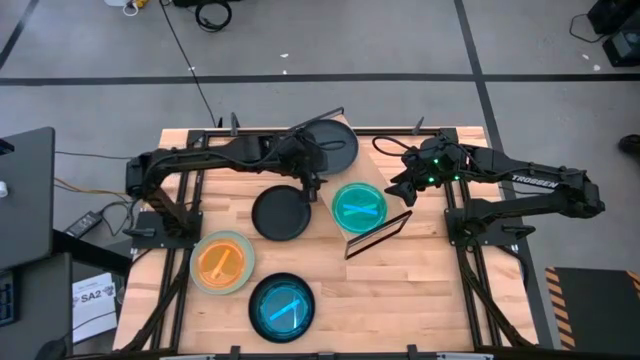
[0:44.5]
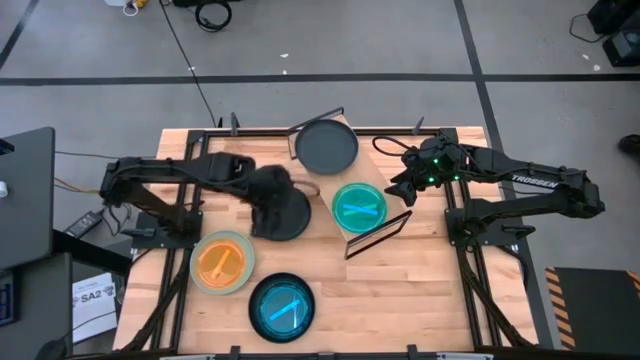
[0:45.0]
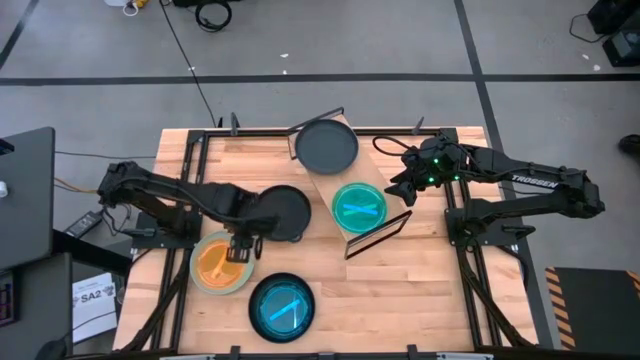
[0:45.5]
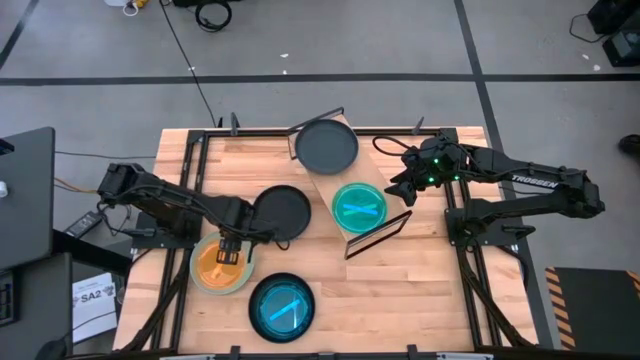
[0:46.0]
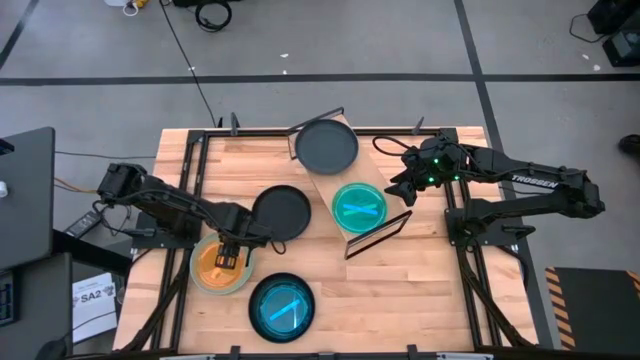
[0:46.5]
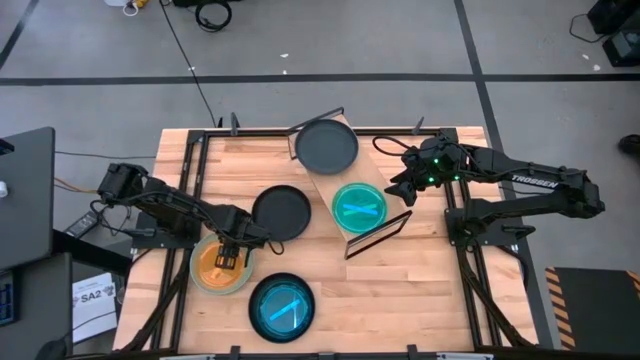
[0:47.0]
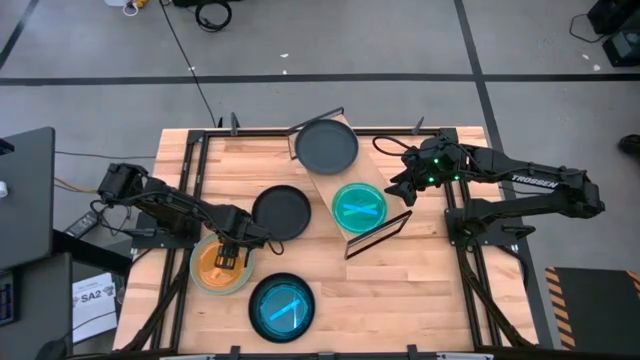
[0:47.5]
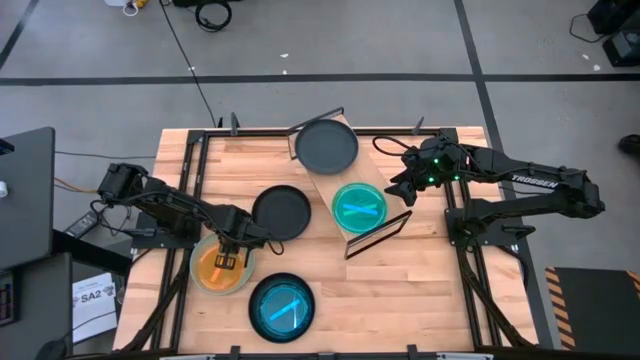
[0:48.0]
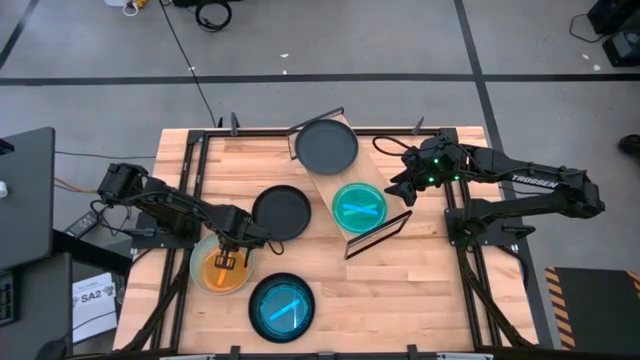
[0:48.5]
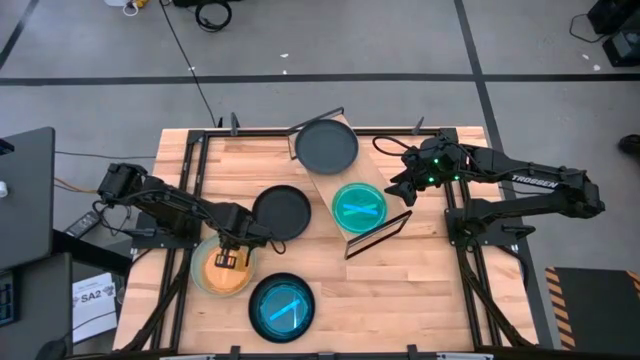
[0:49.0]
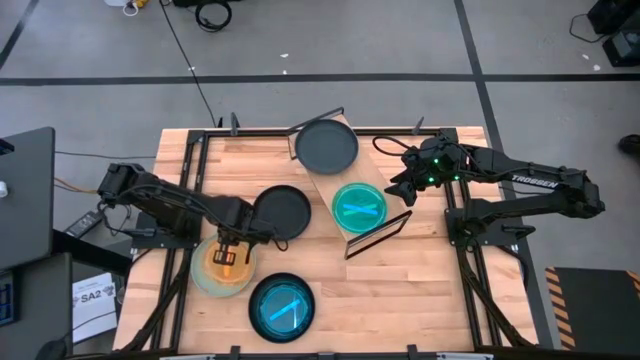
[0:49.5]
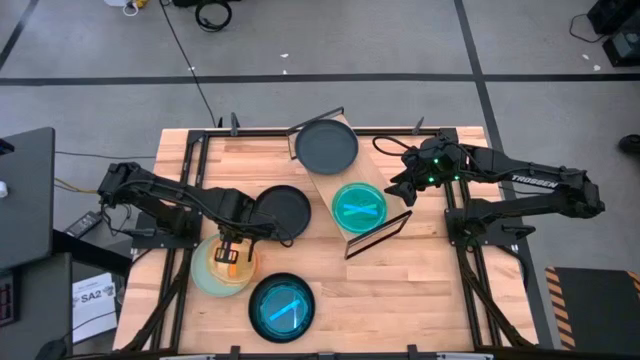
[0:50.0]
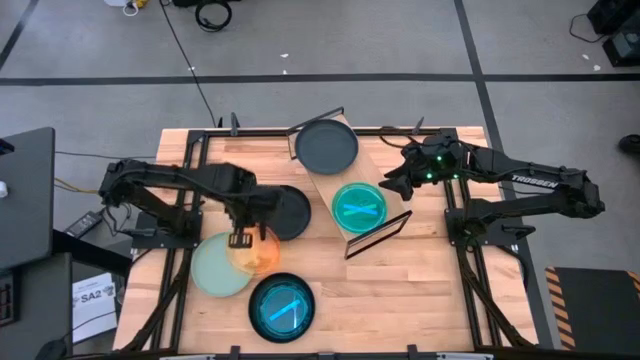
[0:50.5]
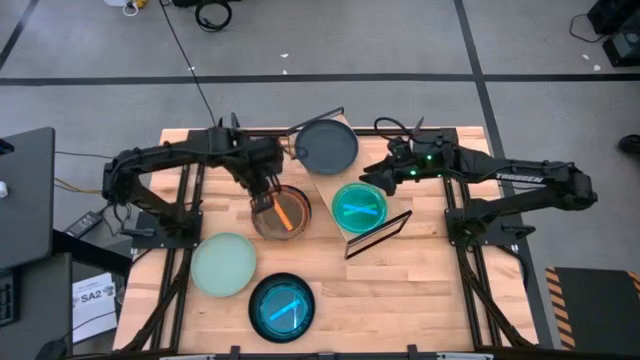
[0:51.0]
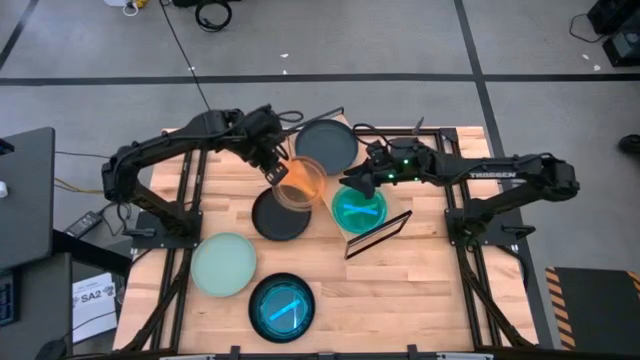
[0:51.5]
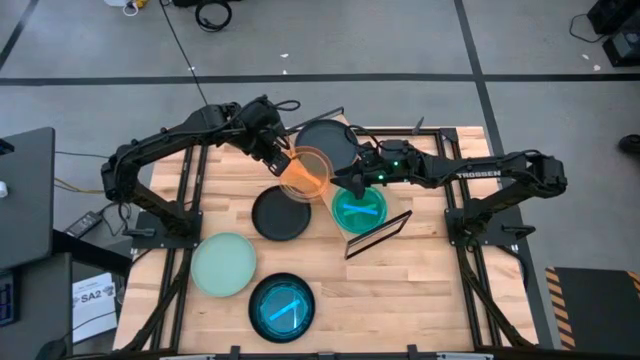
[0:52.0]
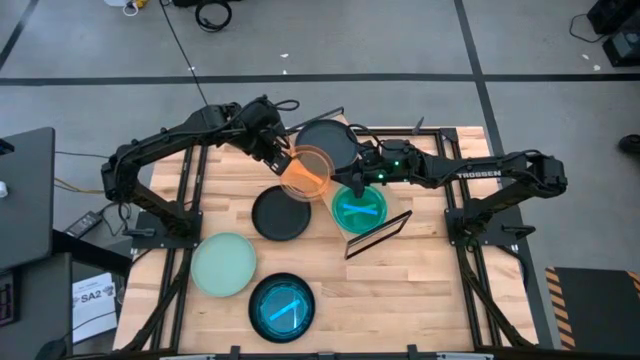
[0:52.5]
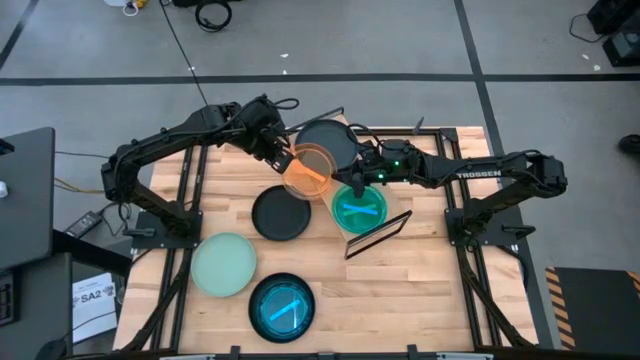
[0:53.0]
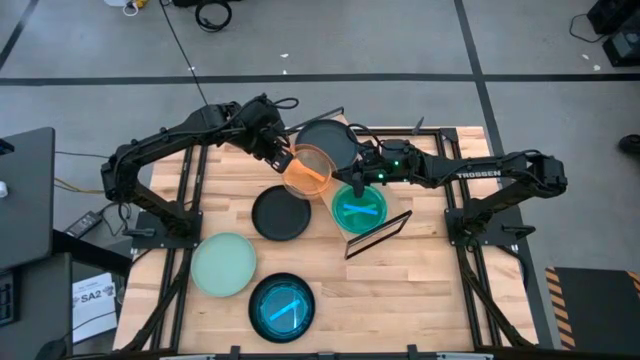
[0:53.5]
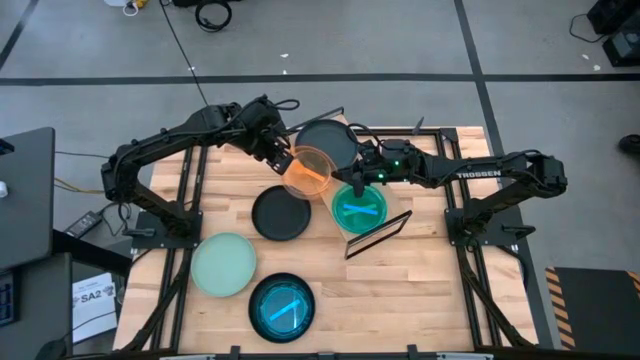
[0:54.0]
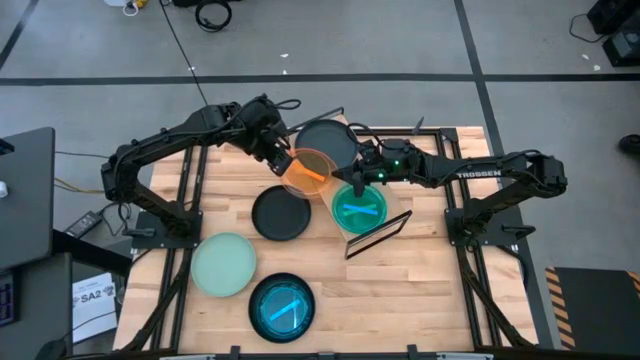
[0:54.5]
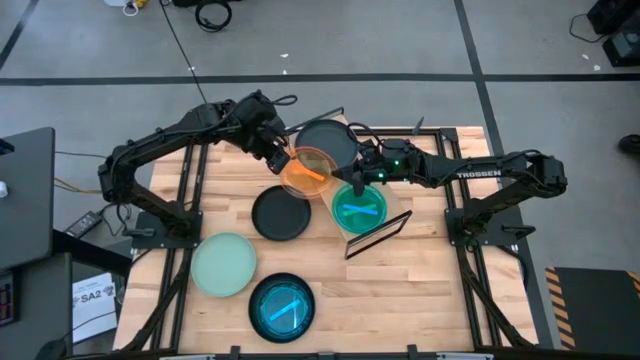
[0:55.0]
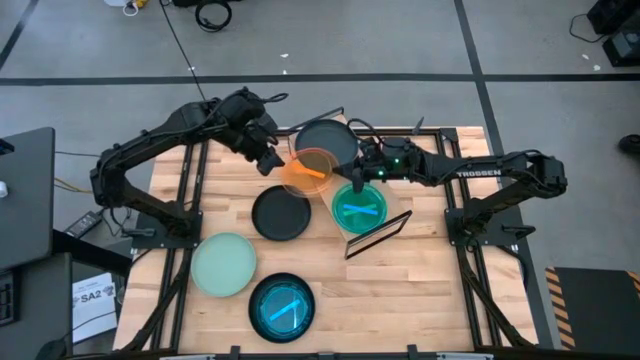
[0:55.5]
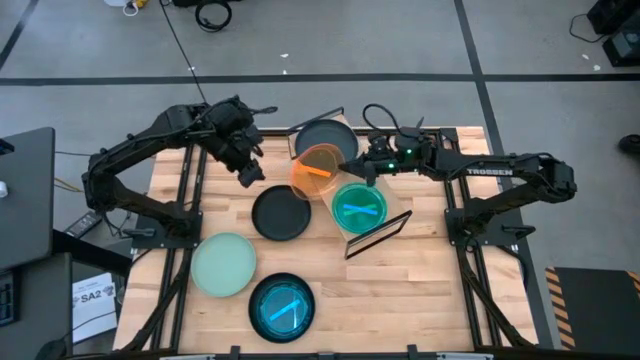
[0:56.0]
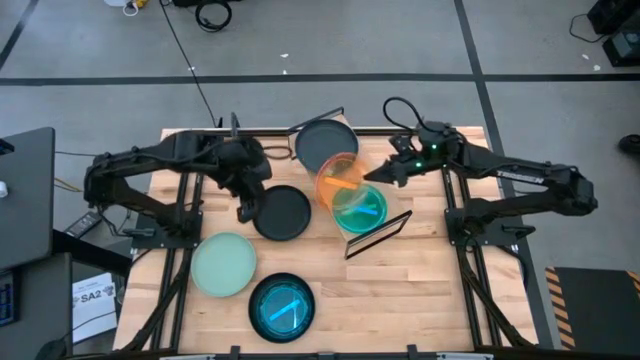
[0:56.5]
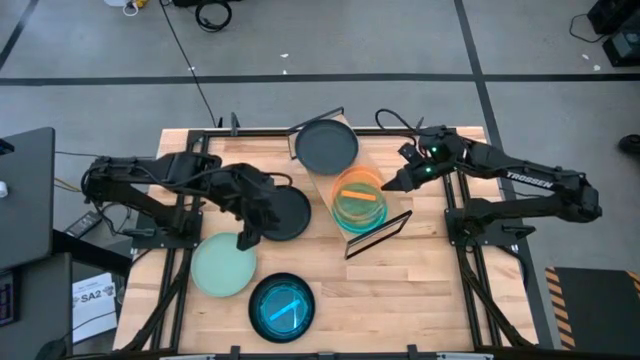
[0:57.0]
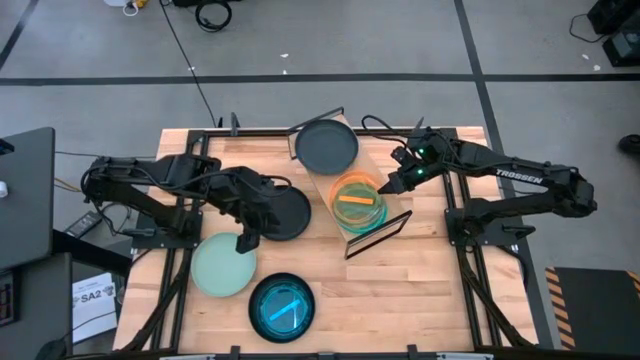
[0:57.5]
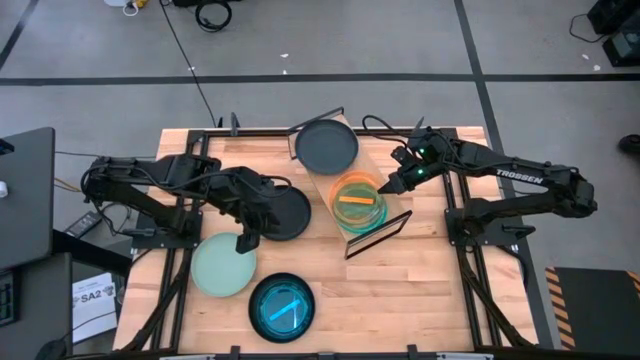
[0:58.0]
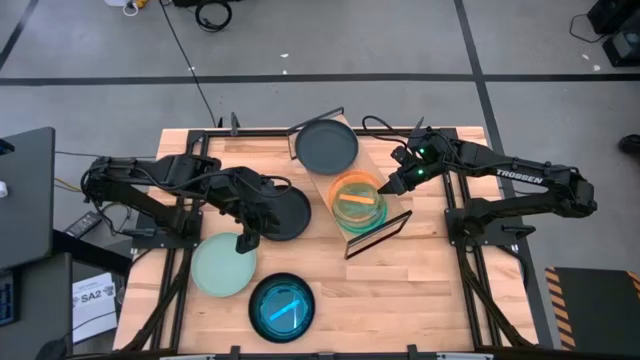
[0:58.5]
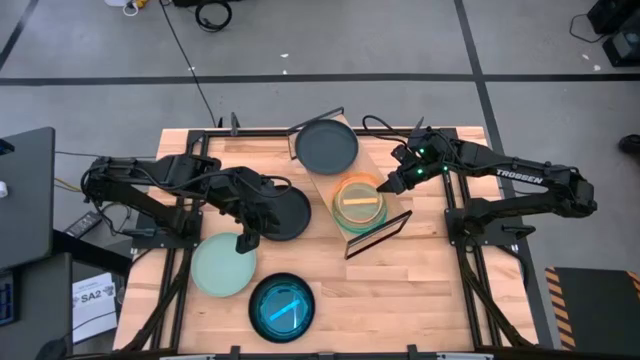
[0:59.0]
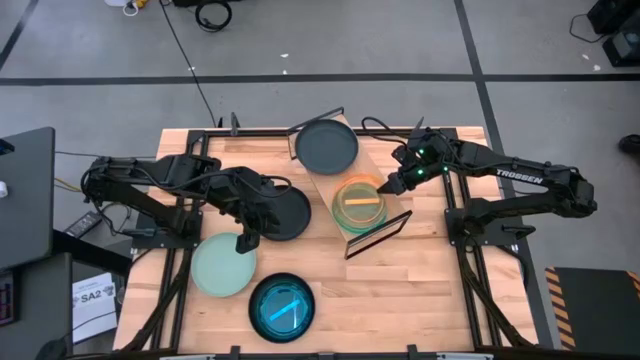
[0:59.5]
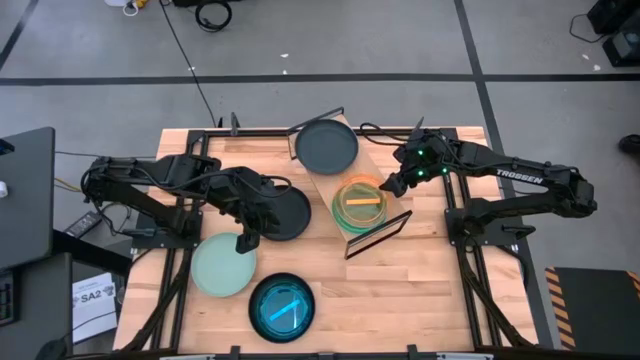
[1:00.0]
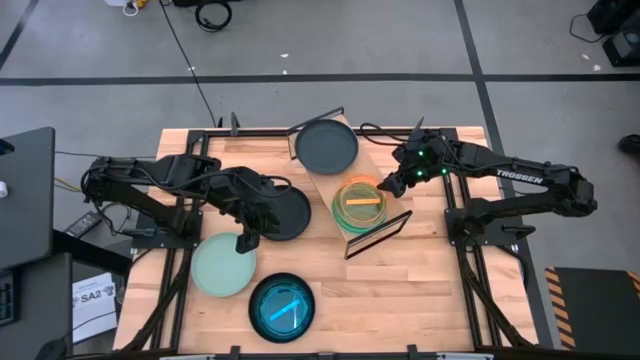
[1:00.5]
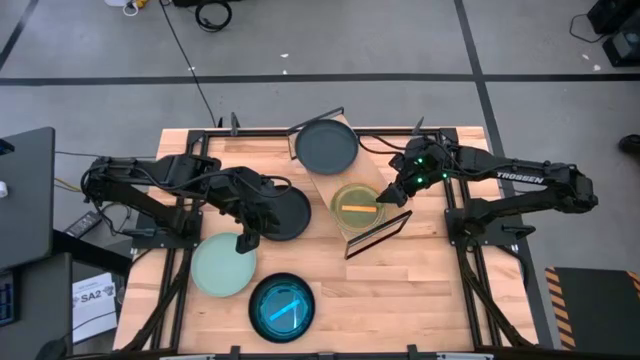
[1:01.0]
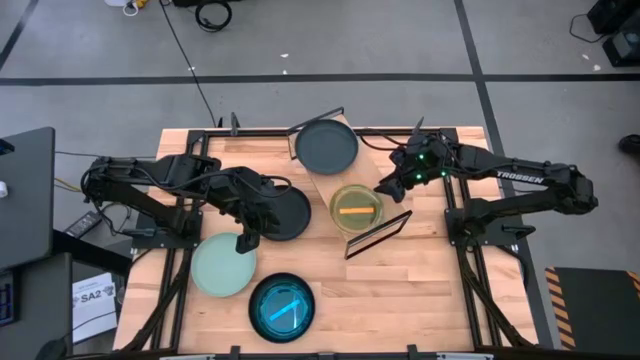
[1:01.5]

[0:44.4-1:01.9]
Task: Place and stack plates onto a shelf
Stack the transparent orange plate on the top of the transparent blue plate on the shelf

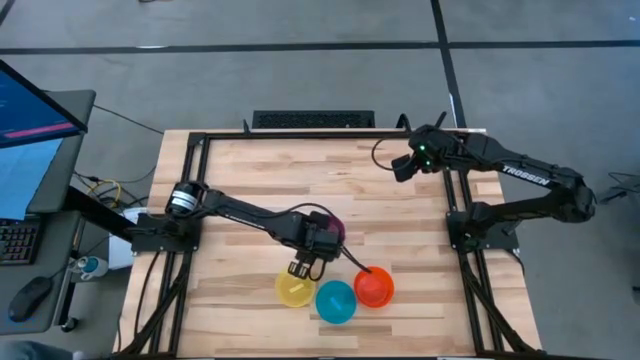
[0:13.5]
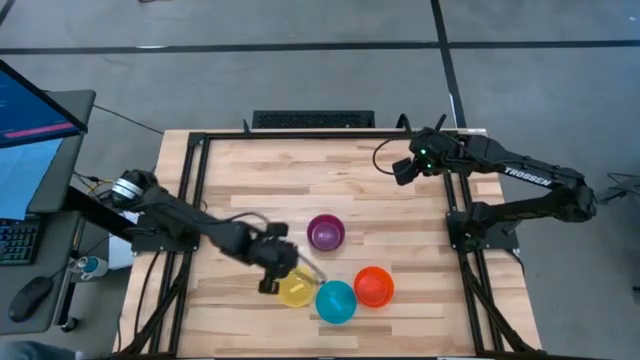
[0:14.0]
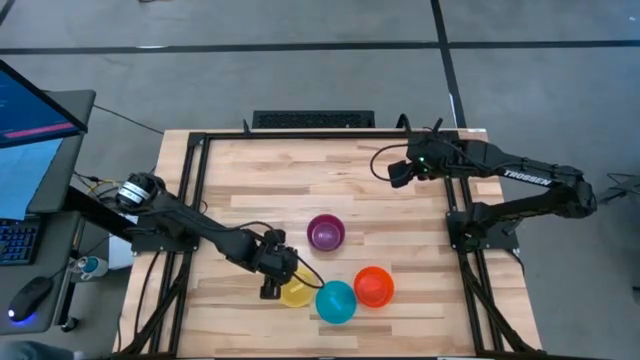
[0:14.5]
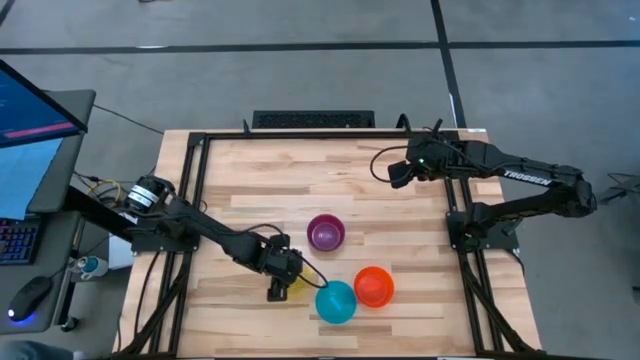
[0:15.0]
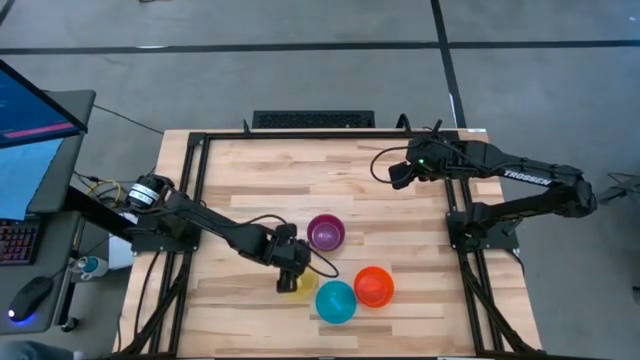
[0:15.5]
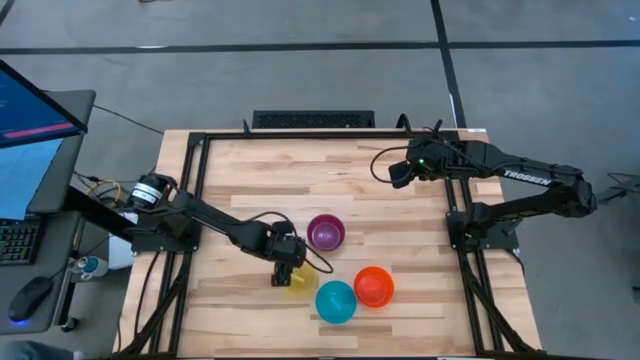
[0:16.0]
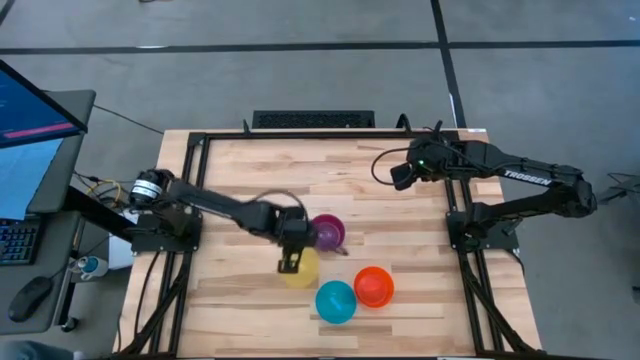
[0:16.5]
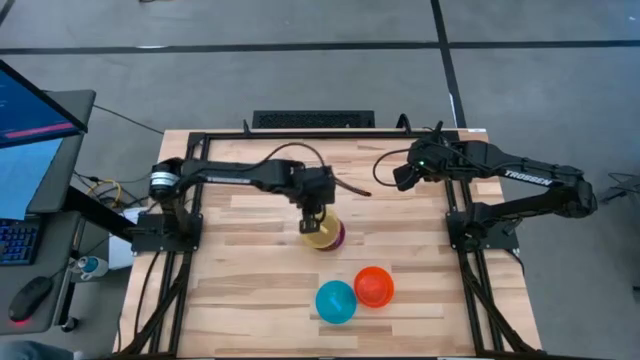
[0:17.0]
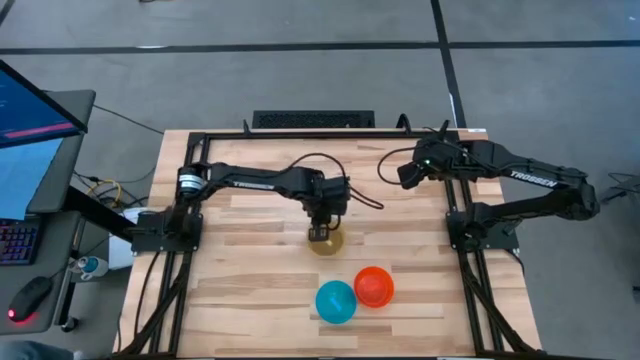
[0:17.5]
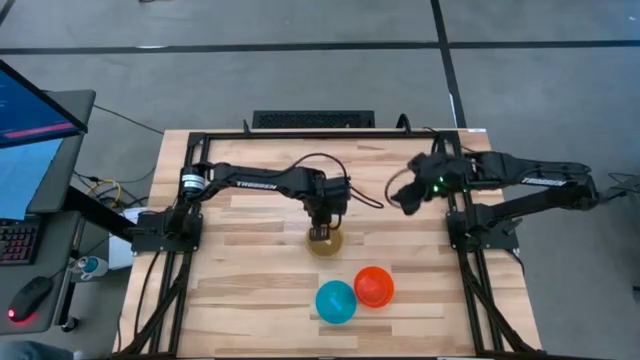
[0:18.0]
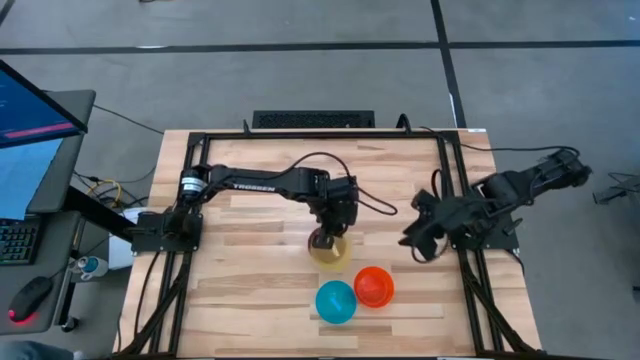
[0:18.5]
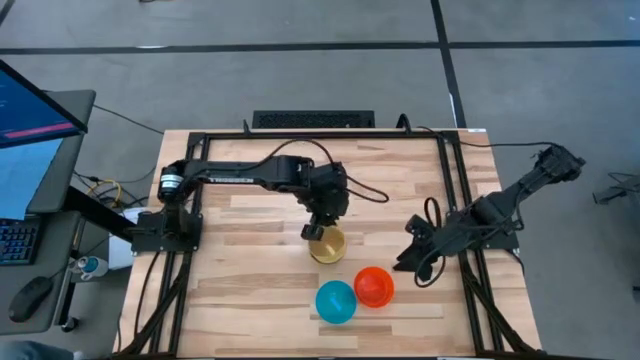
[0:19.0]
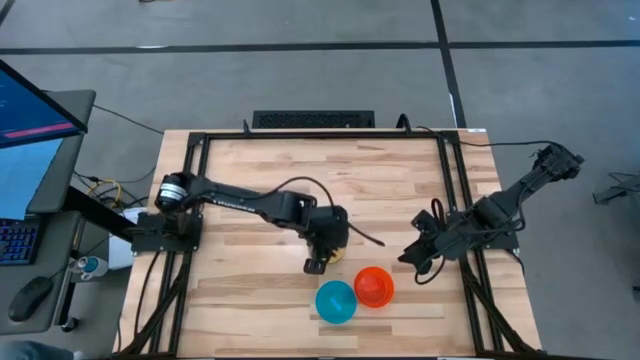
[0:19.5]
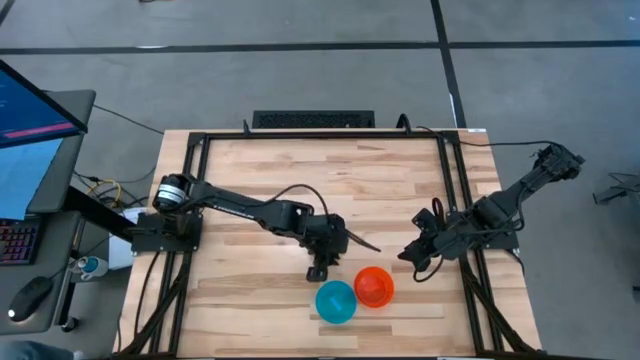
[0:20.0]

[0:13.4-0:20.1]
Task: Nest bowls inside each other
Stack the yellow bowl on top of the purple bowl
